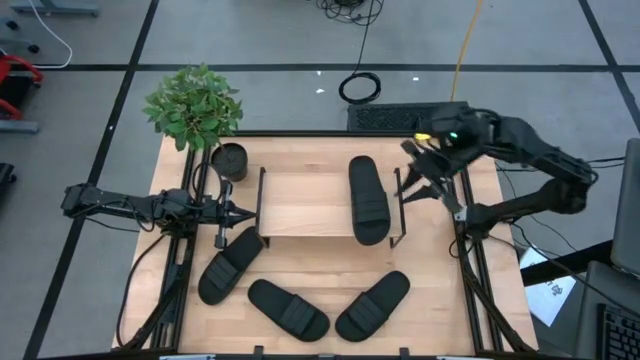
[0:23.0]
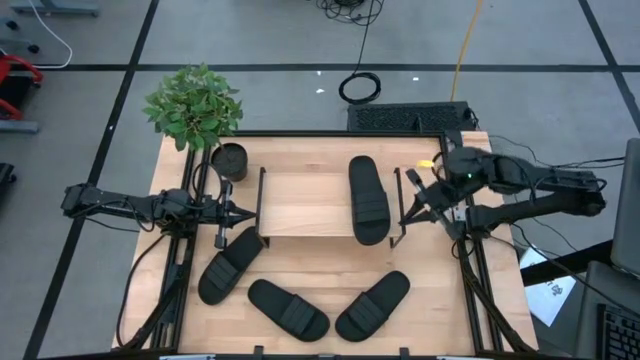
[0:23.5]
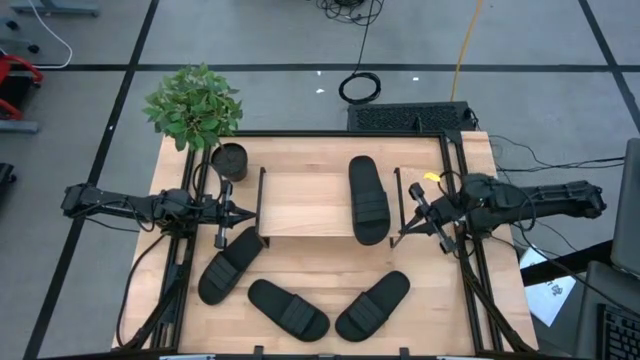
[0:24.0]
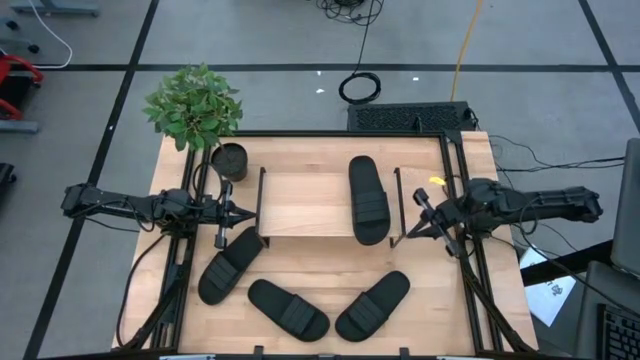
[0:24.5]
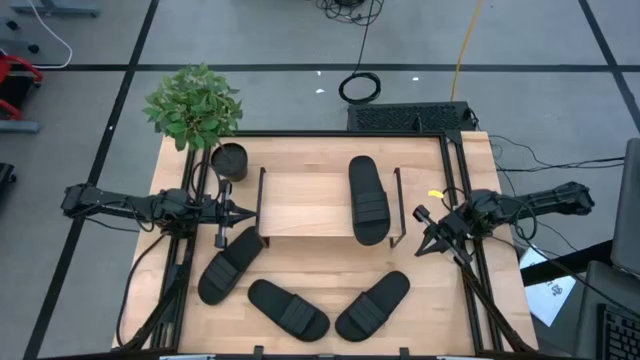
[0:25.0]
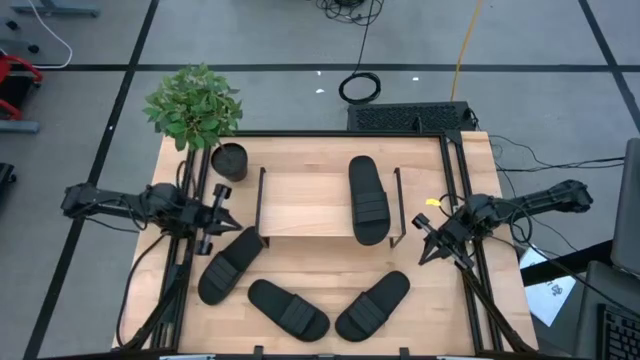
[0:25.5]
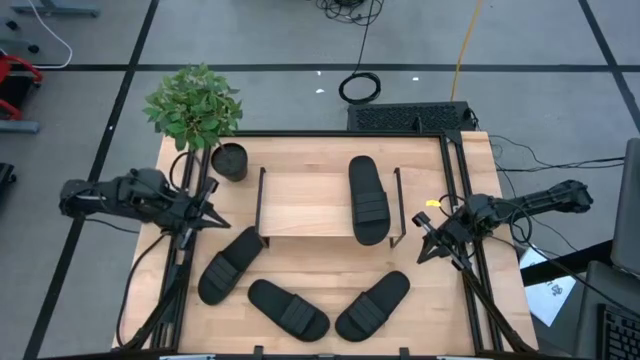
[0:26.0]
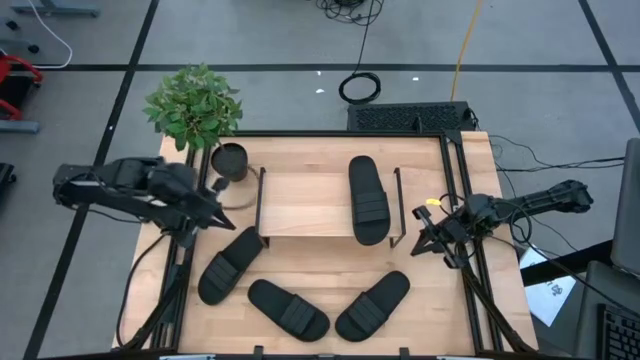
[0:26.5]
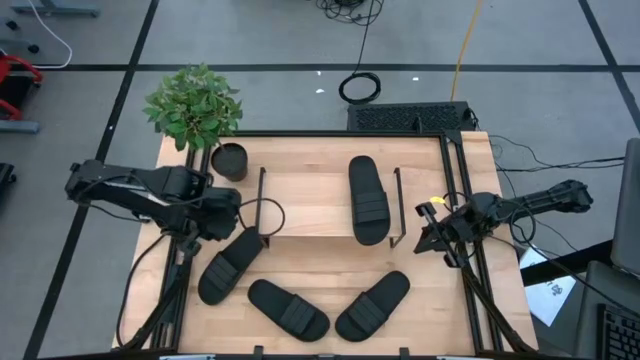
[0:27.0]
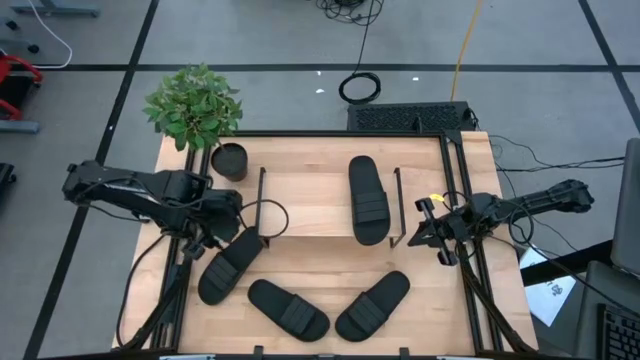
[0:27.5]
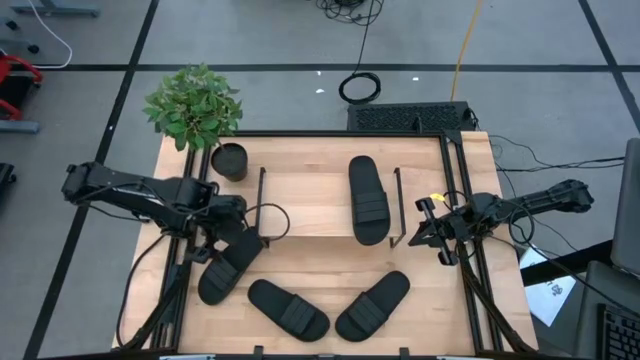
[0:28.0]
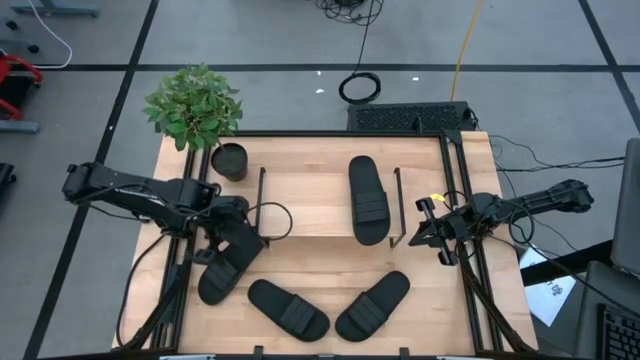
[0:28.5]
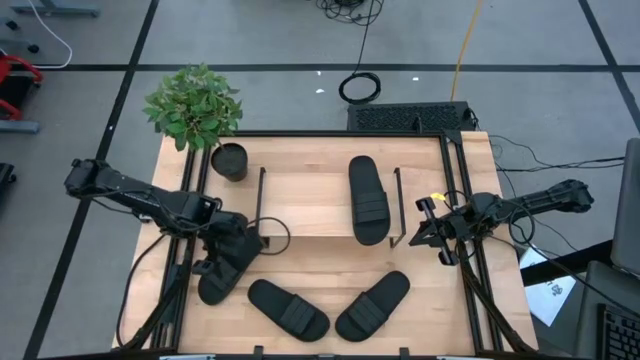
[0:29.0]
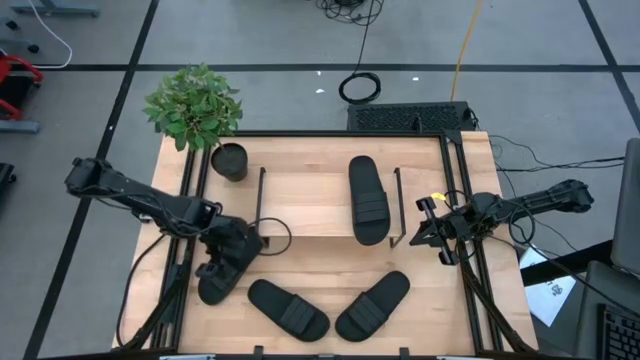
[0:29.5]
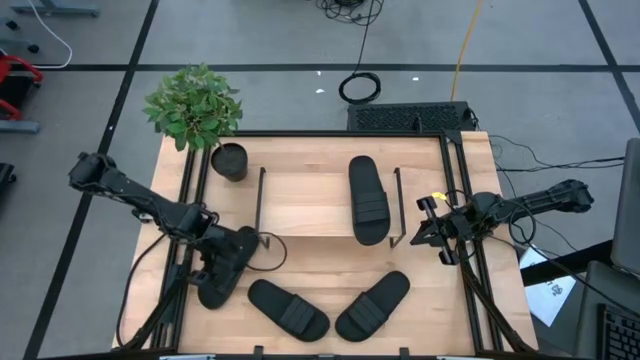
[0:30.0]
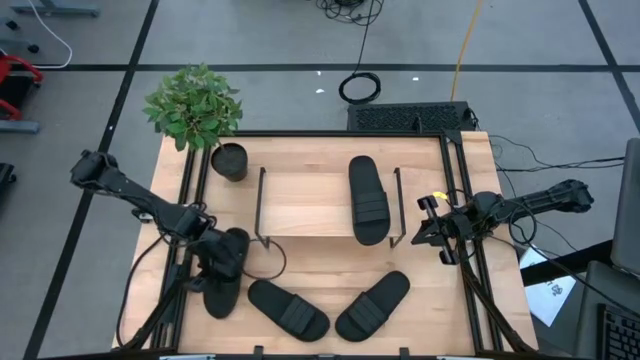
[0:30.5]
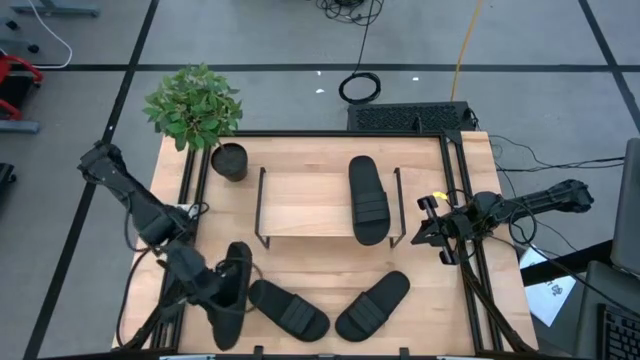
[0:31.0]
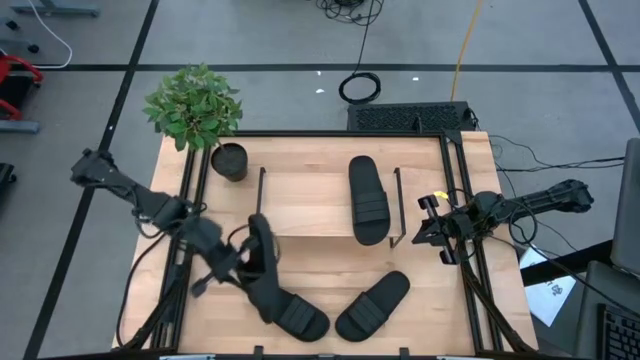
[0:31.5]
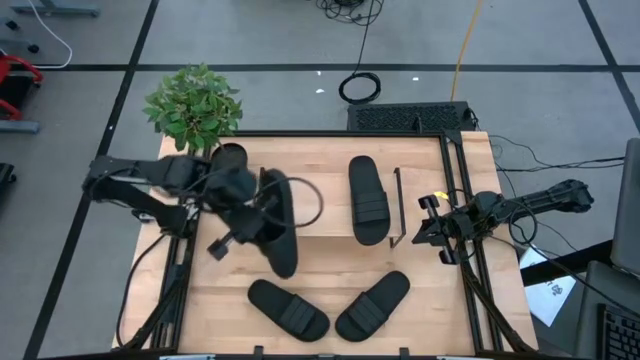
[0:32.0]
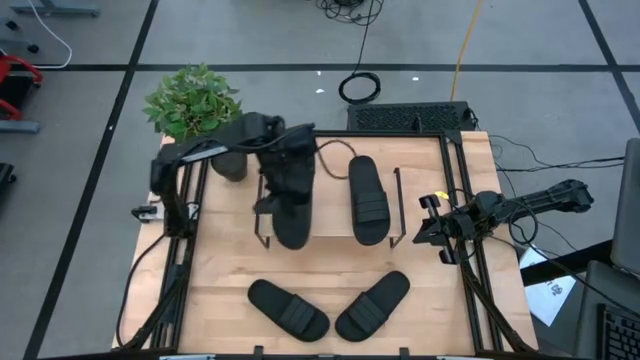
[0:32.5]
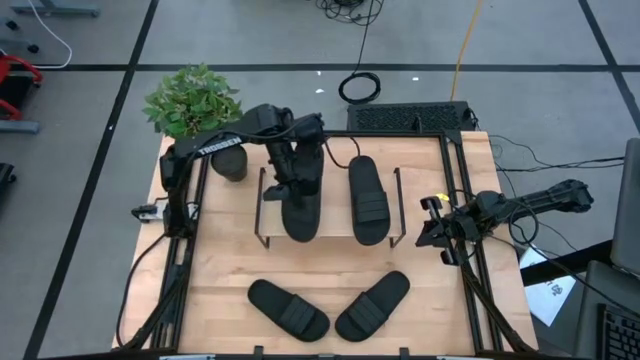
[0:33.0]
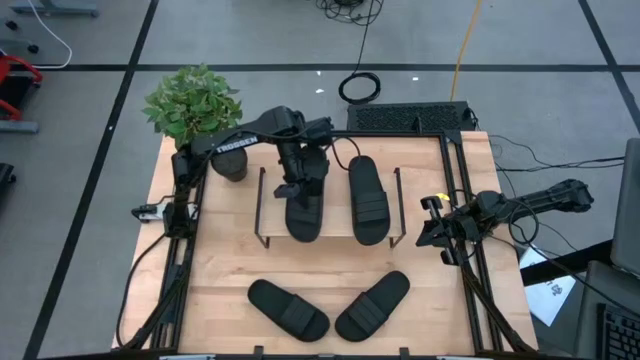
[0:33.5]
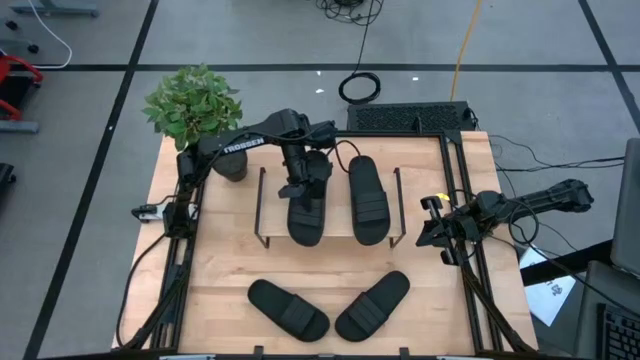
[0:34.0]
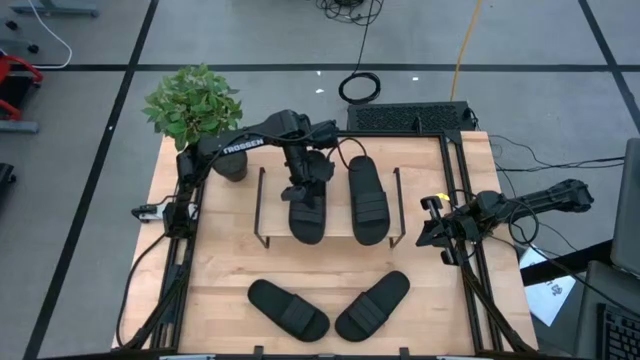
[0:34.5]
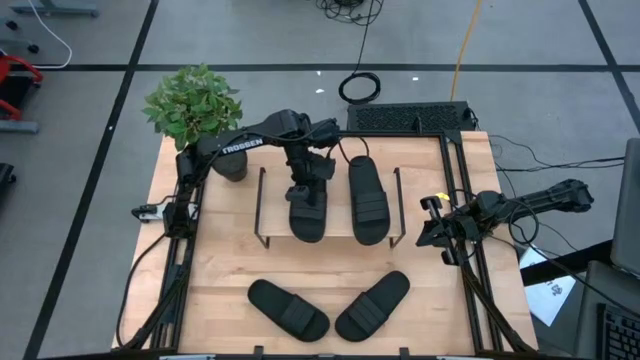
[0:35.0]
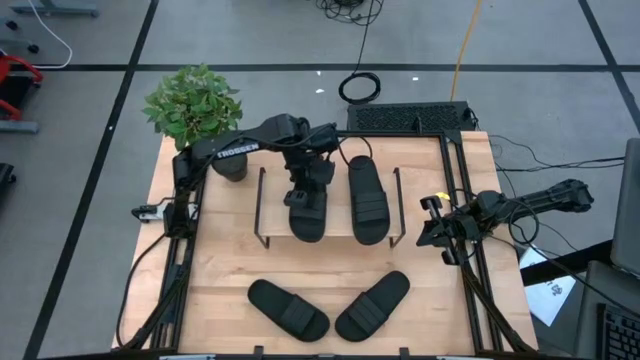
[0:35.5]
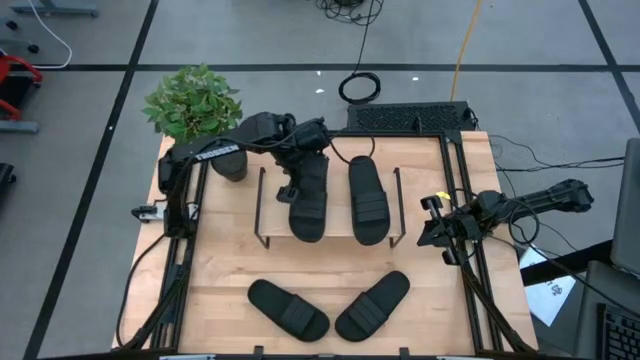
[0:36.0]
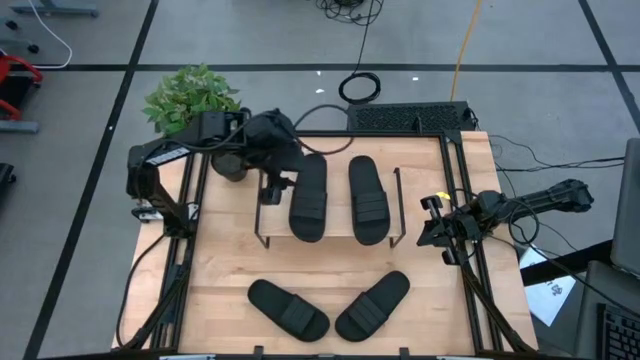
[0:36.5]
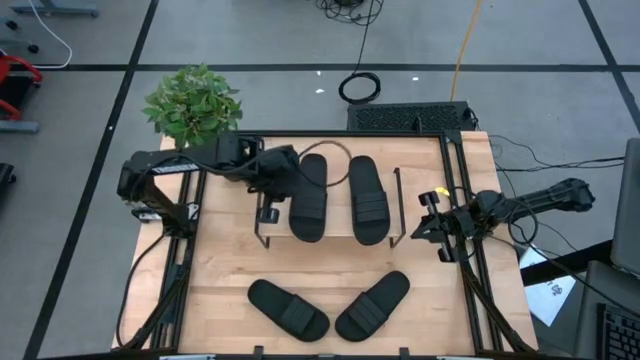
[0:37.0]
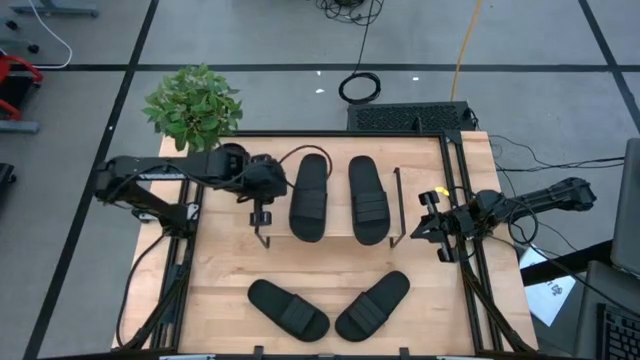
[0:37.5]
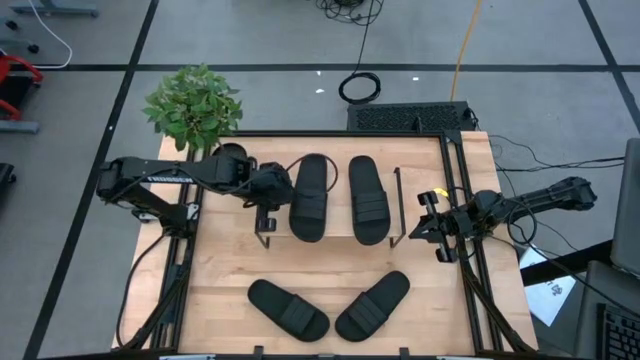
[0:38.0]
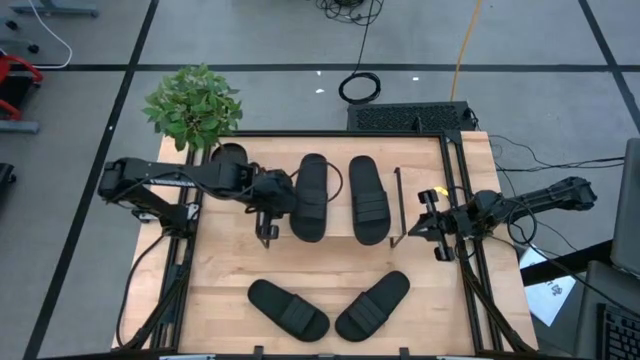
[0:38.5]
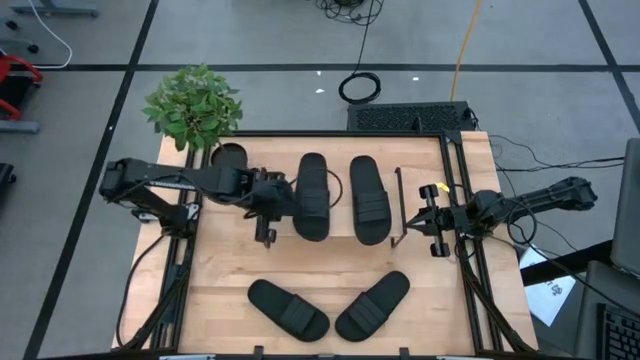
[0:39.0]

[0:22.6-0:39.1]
Task: Pick and place slides into the shelf
Put the black slide on the shelf

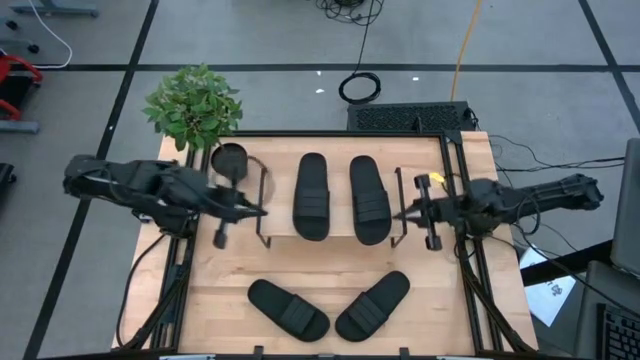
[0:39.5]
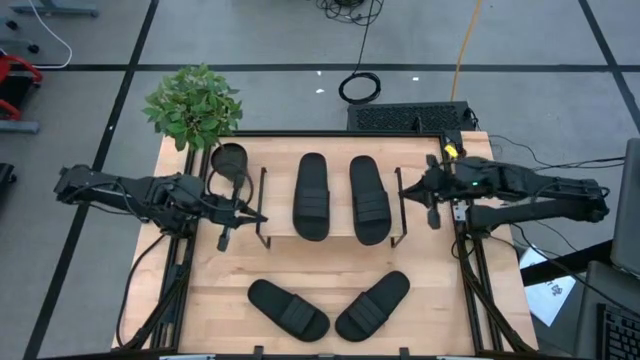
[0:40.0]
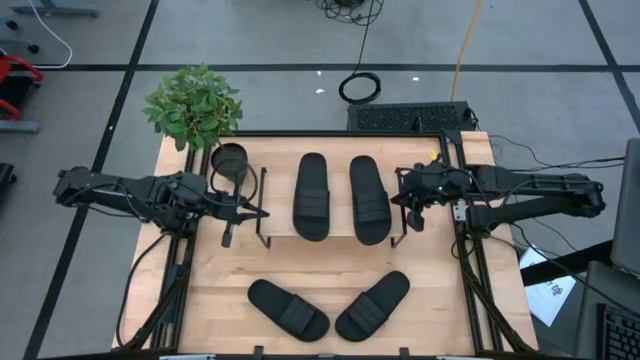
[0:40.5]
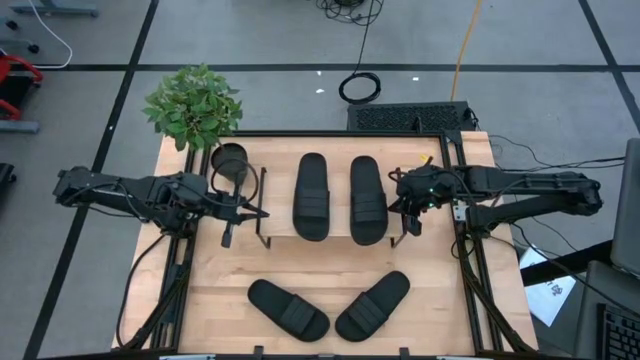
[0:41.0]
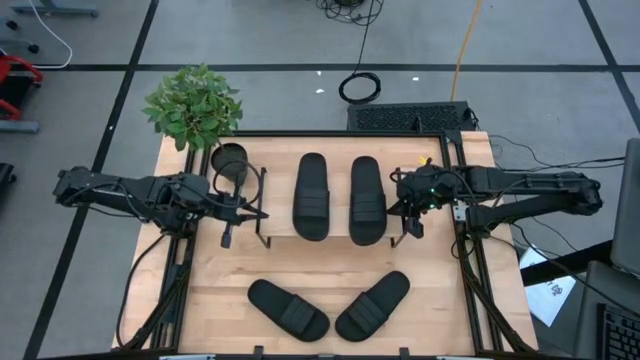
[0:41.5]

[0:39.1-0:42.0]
Adjust the right black slide on the shelf

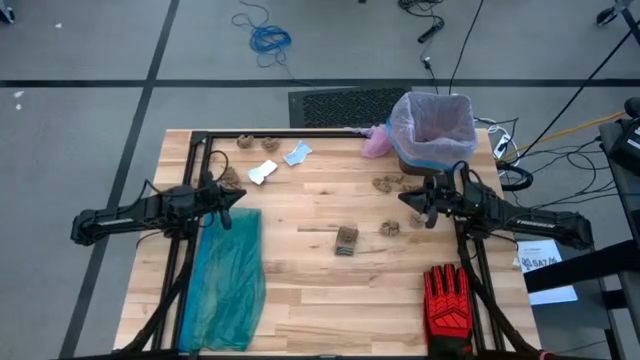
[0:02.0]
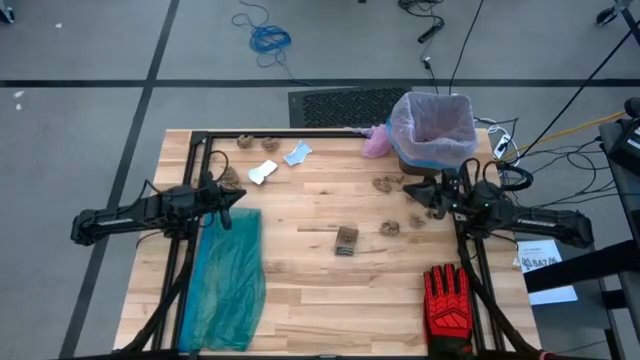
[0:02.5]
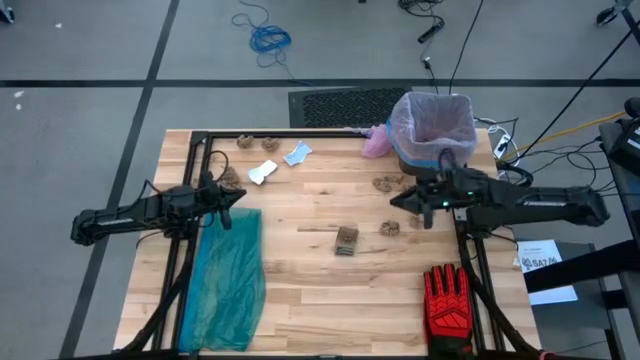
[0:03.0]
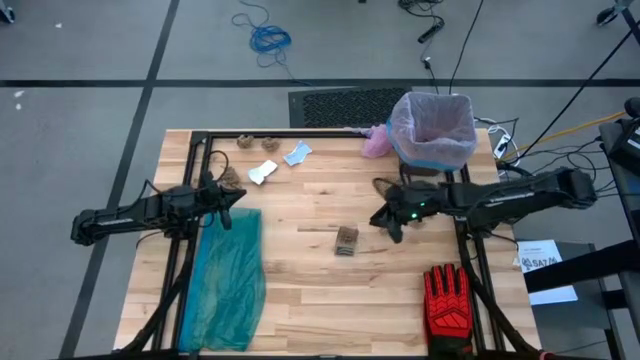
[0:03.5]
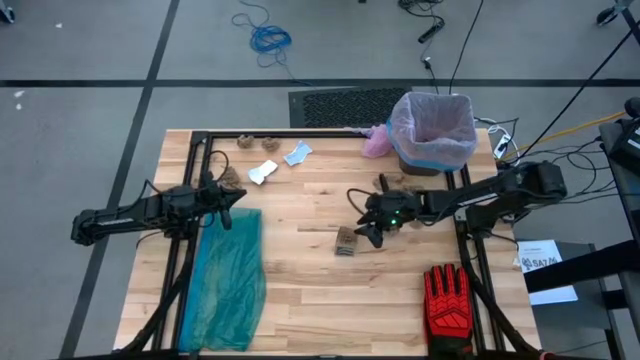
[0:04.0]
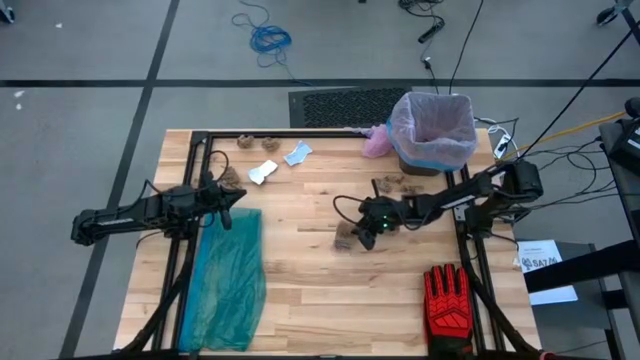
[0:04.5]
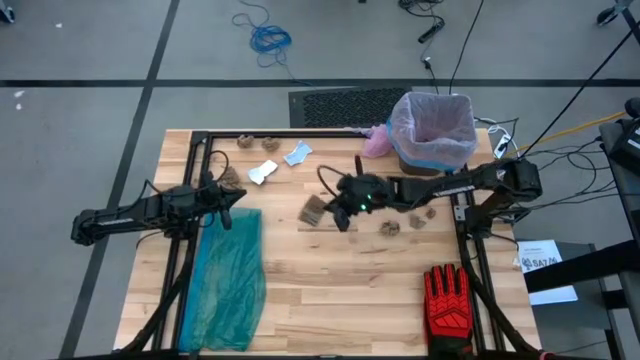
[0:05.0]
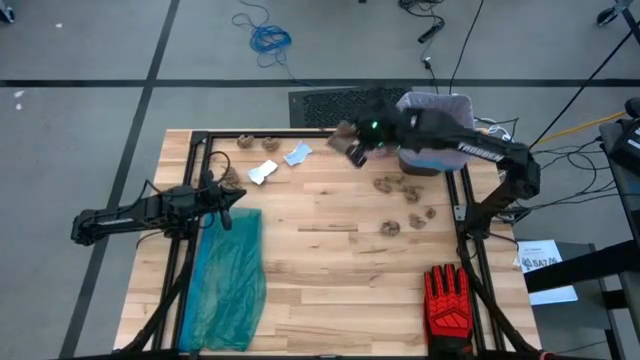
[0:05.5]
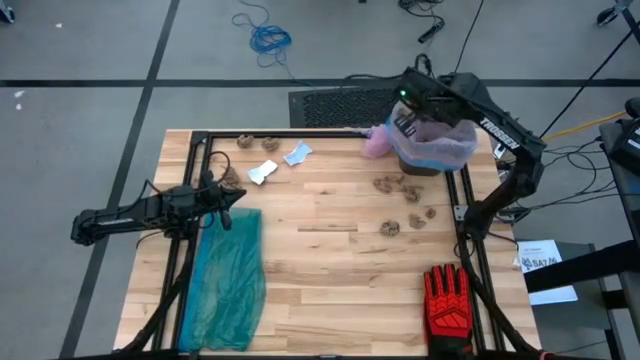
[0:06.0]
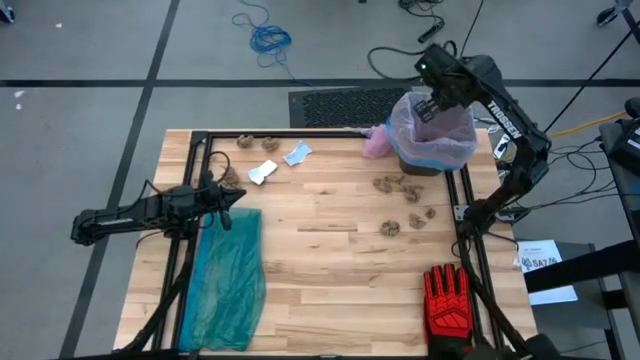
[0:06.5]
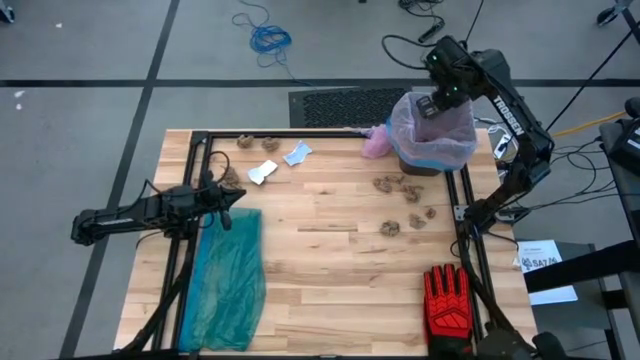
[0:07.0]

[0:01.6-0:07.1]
Task: place trash/remove bag and relplace
Put the cardboard coffee sleeve in the trash bin
